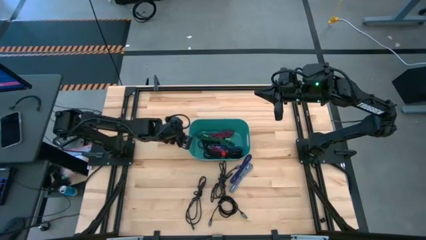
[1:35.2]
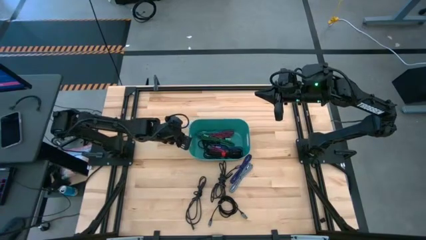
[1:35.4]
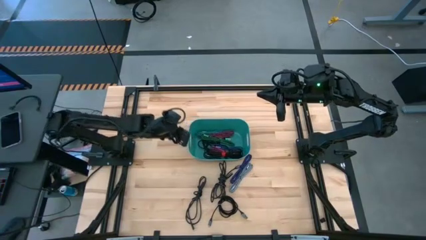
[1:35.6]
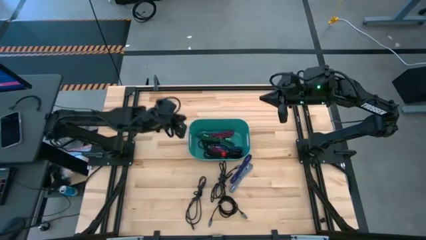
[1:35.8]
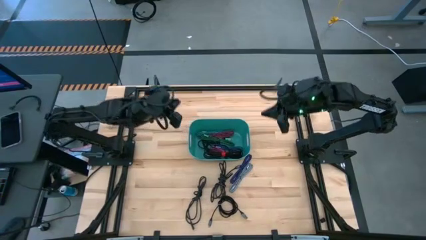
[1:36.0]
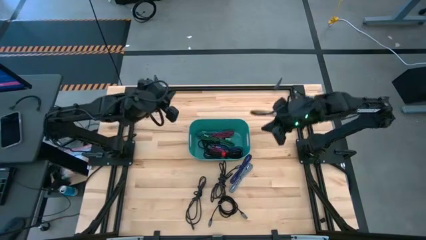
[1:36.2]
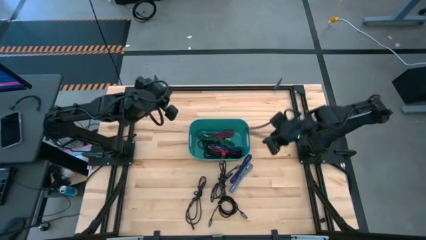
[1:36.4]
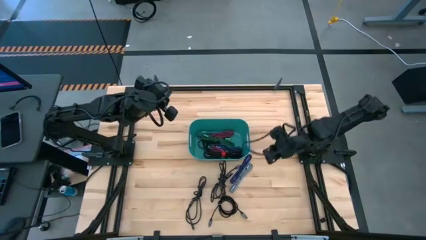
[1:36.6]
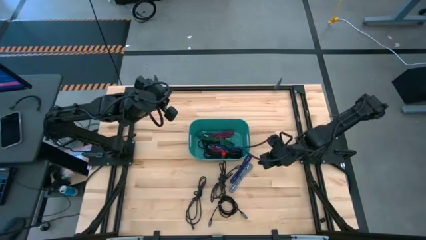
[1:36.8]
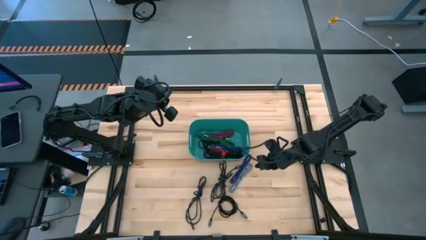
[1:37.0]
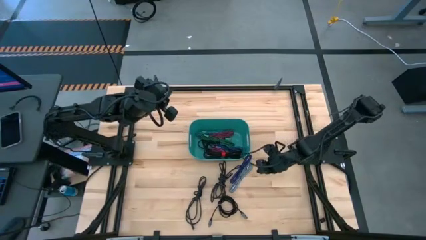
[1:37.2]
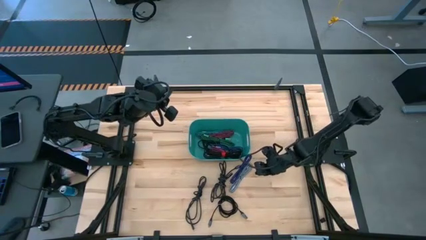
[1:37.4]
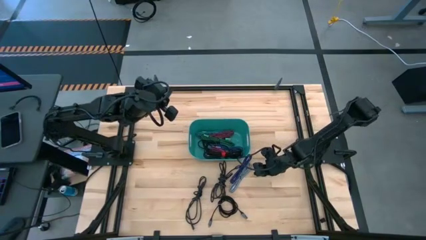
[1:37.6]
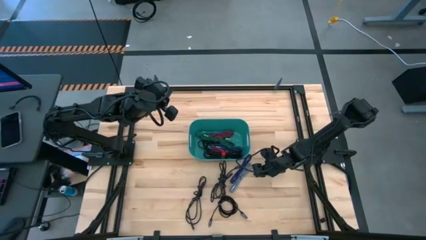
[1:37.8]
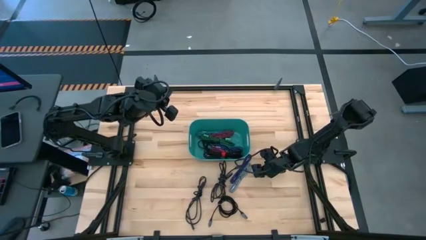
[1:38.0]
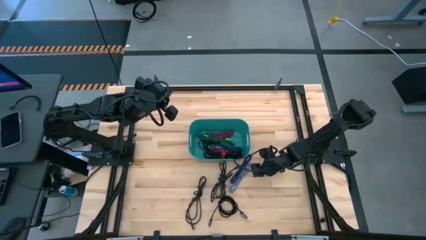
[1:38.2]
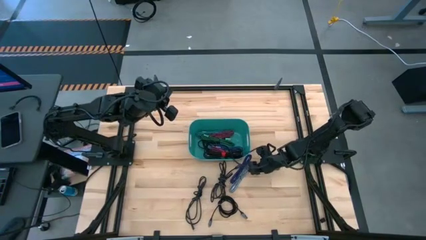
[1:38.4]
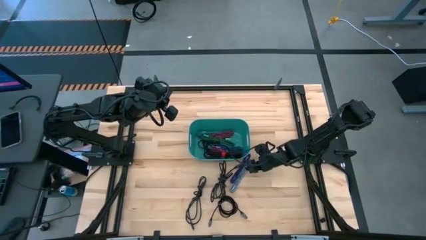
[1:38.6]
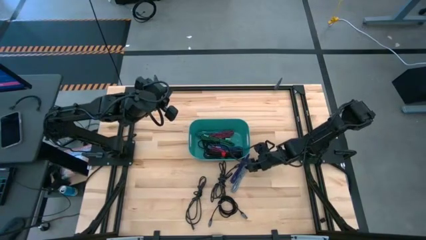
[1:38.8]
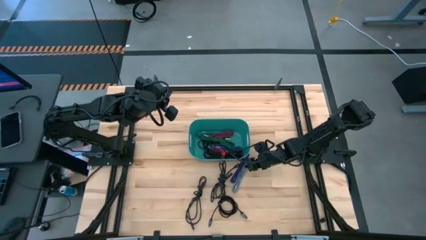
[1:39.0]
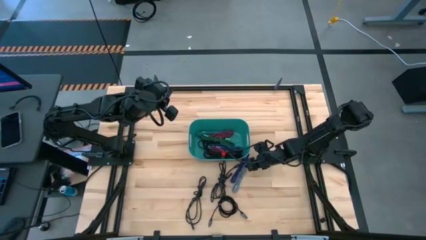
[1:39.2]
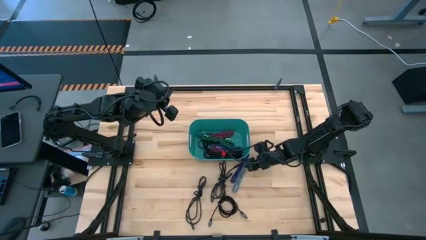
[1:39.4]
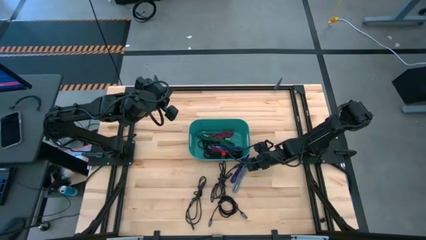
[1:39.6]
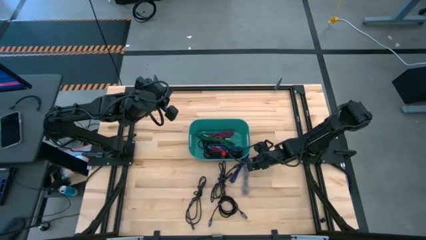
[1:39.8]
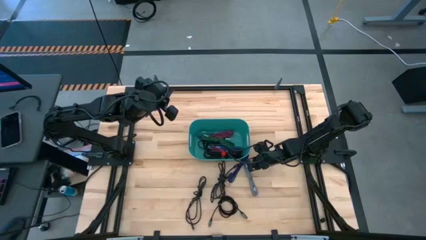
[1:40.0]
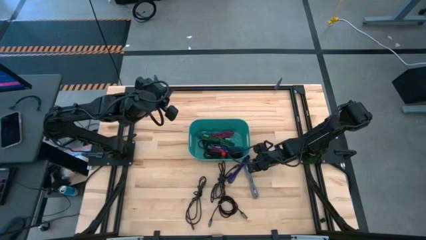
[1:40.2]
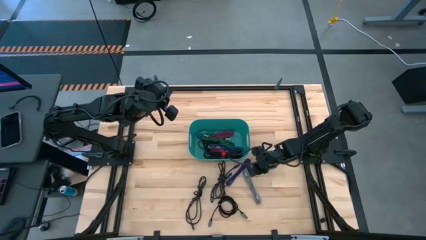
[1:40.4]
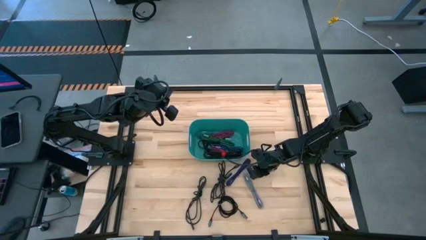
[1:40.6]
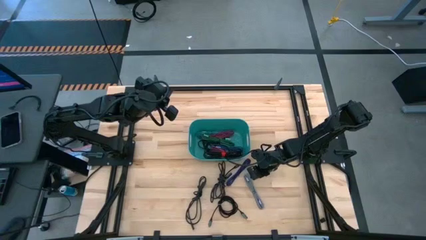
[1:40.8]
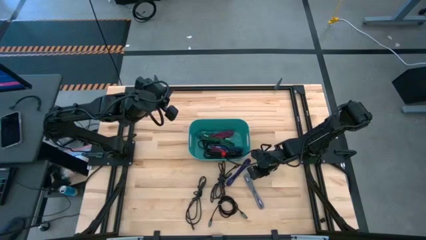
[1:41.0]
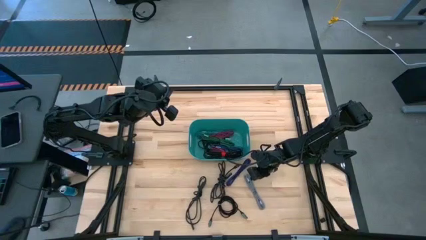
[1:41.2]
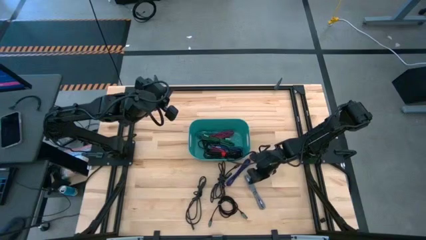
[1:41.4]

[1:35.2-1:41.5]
Task: Pick and place USB-C Cables
Put the gray charger cable into the light blue bin

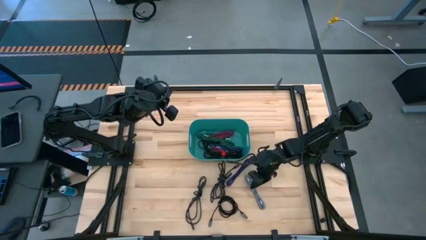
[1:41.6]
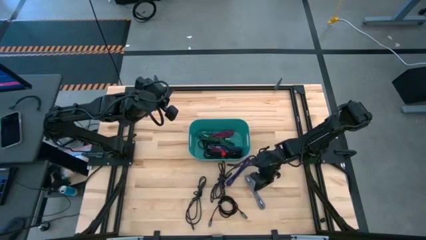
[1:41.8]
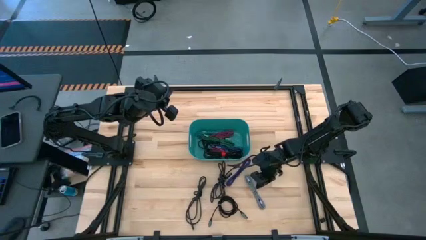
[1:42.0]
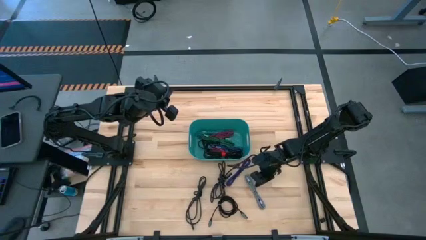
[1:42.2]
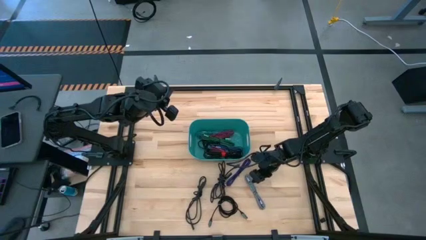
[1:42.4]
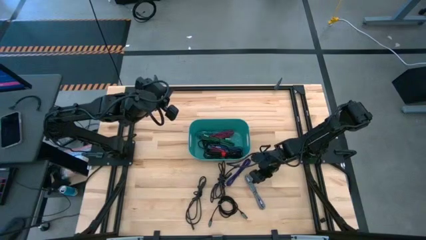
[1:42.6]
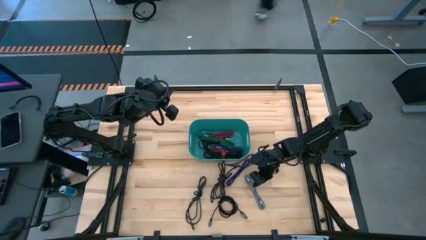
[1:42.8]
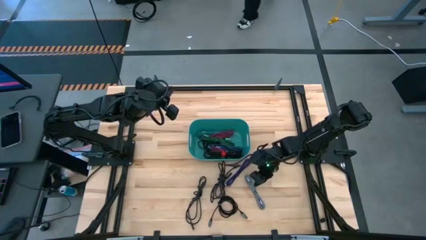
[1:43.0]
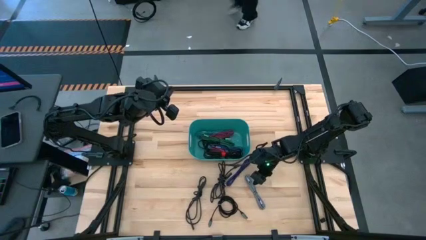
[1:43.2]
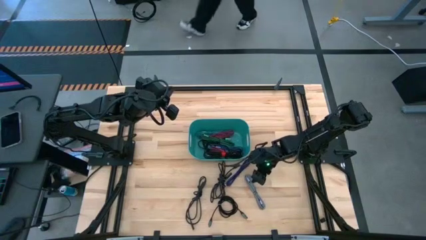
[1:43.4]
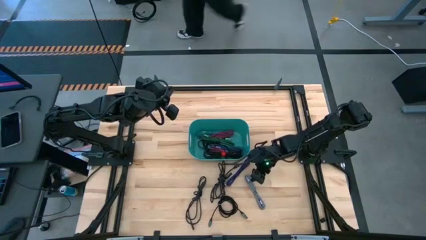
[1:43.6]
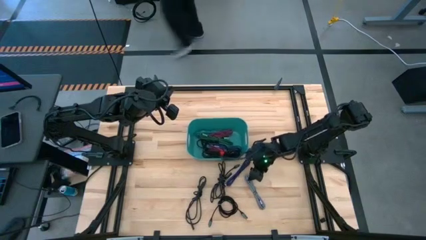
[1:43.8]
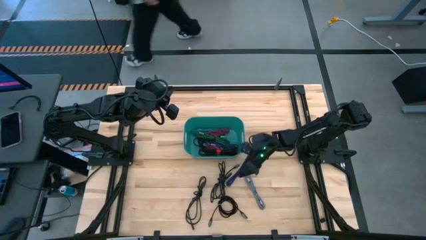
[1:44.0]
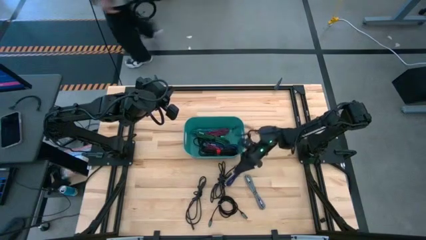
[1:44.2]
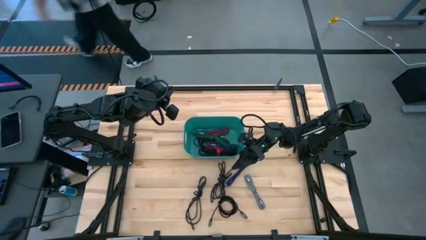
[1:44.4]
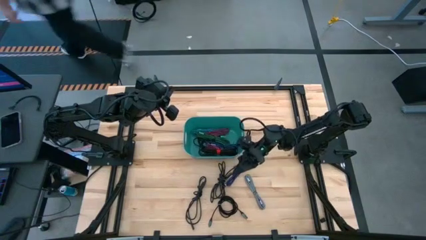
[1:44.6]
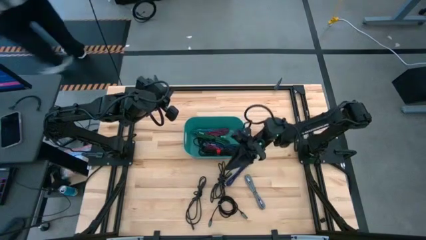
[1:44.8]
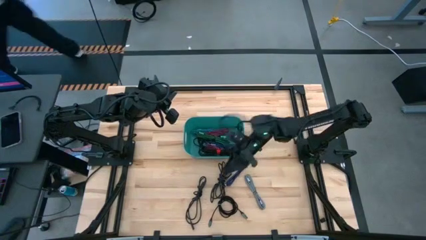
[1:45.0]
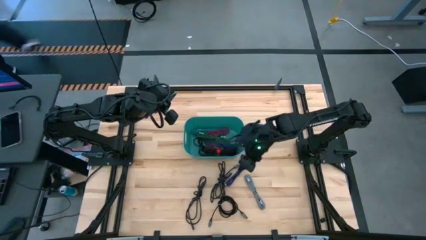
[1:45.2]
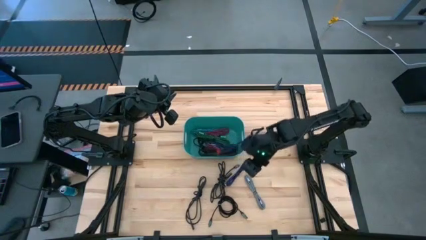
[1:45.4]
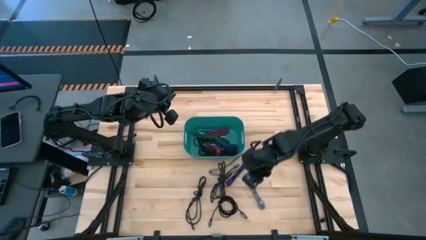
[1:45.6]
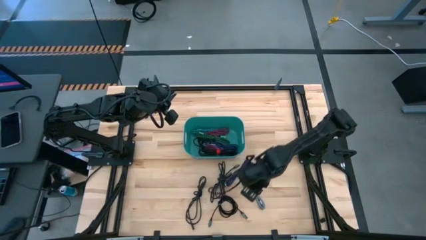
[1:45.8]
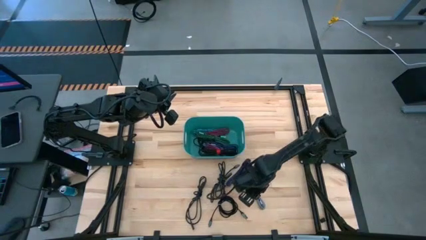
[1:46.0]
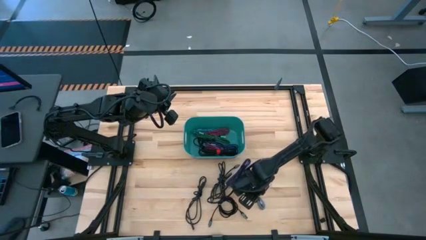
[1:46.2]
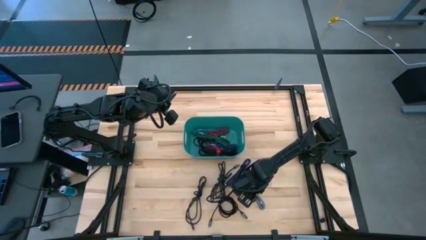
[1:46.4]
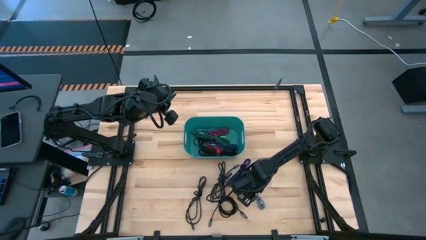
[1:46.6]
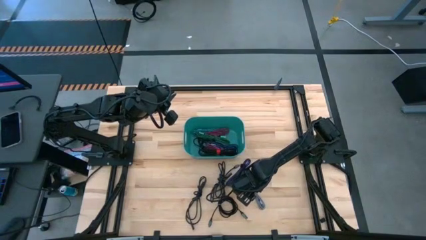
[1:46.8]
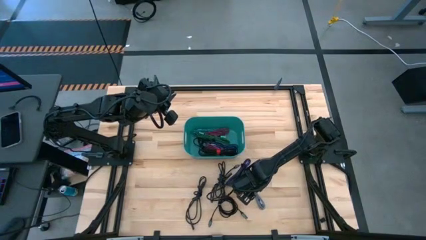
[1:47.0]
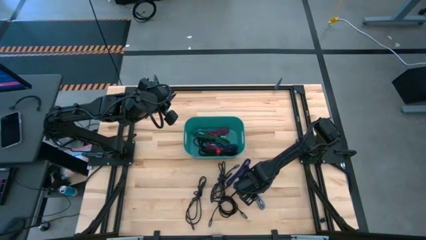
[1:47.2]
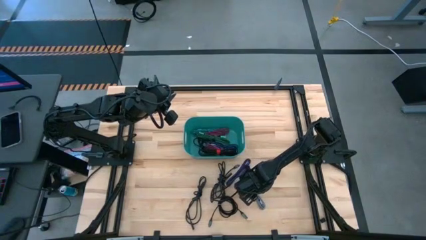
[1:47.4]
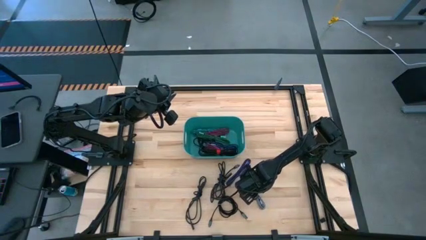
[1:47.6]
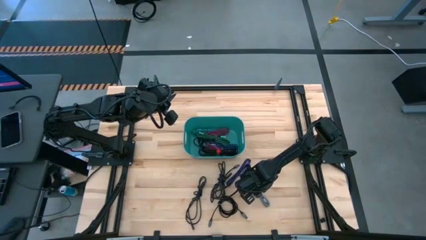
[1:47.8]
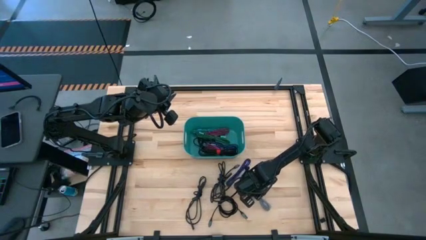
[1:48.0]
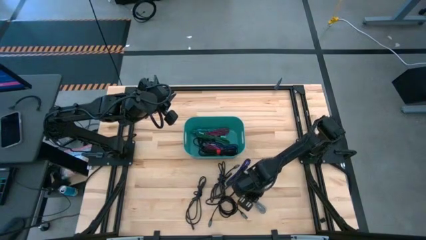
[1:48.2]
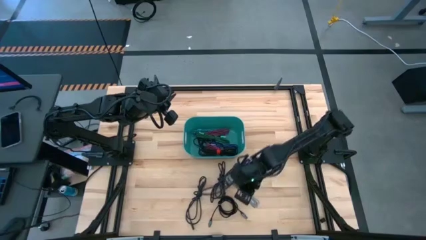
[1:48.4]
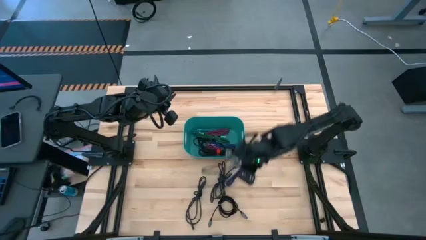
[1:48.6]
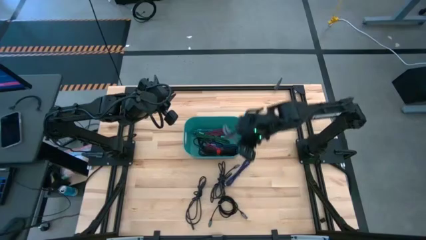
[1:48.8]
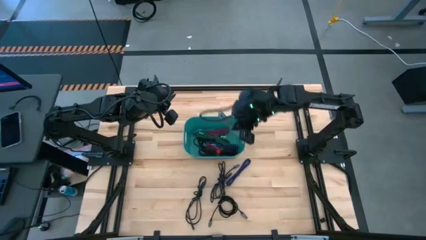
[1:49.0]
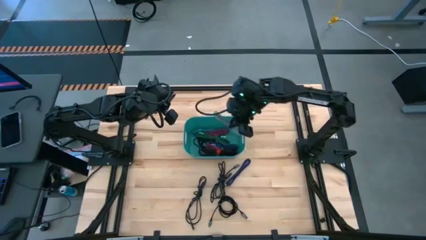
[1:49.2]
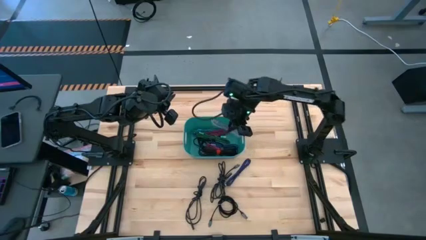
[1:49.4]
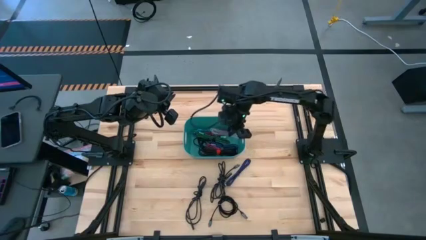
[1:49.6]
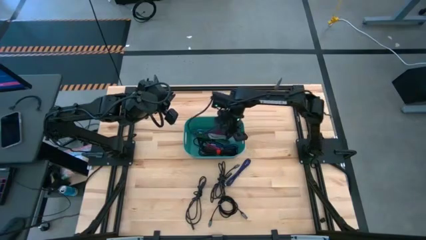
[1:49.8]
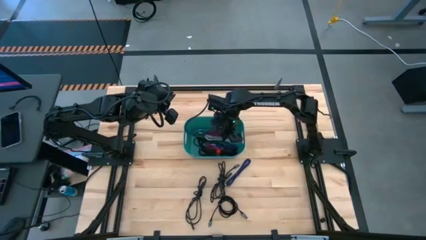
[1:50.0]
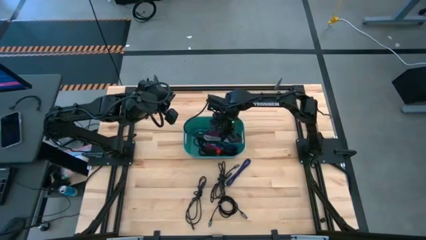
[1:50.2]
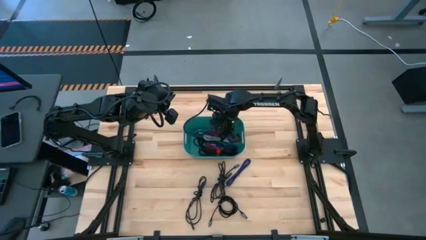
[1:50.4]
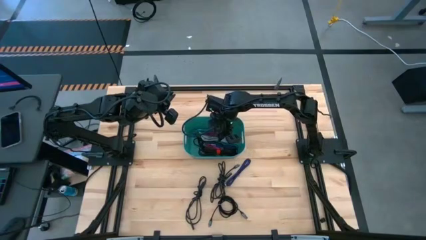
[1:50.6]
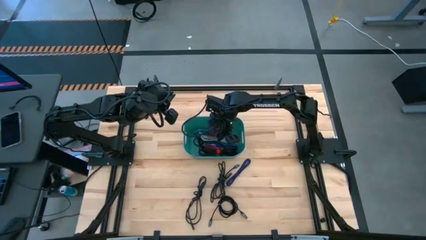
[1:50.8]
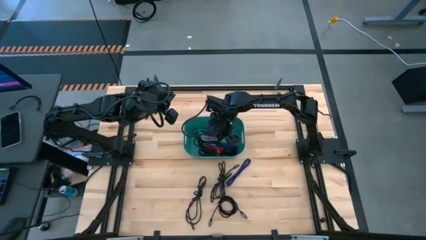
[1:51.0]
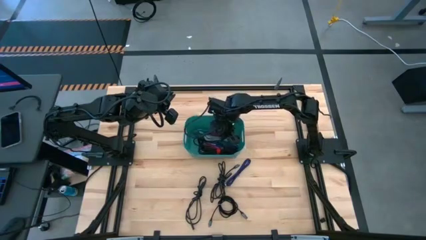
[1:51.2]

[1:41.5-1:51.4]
Put the gray charger cable into the light blue bin
